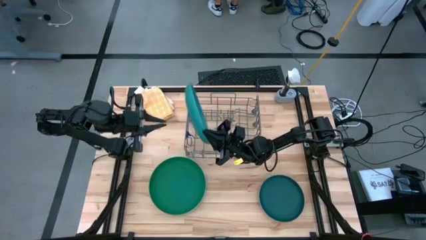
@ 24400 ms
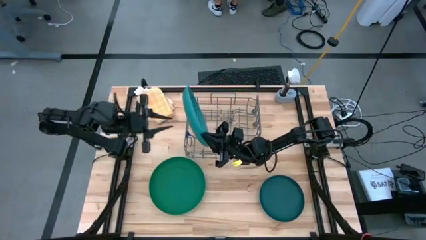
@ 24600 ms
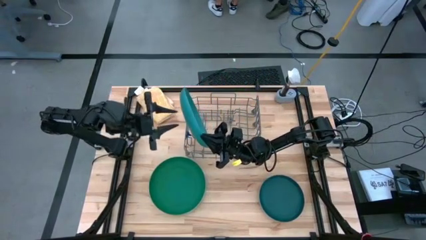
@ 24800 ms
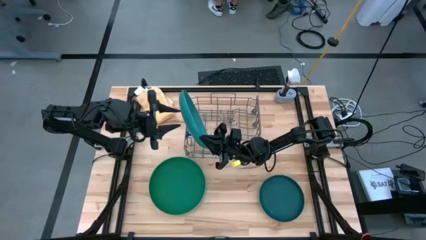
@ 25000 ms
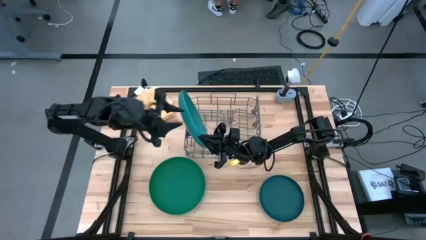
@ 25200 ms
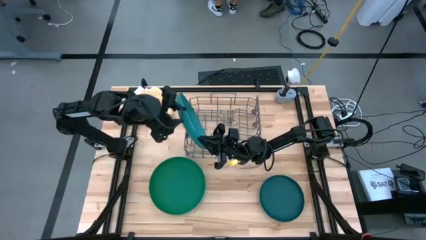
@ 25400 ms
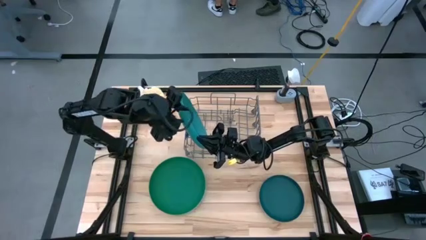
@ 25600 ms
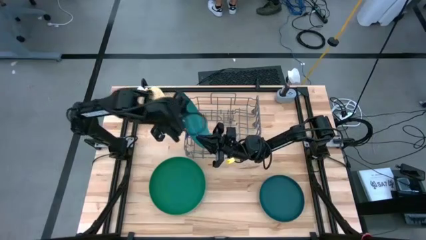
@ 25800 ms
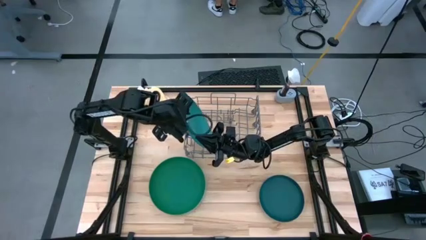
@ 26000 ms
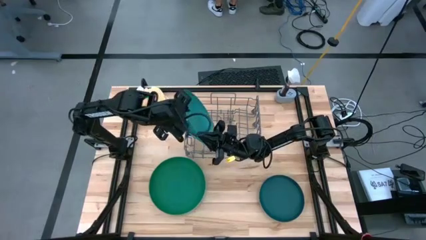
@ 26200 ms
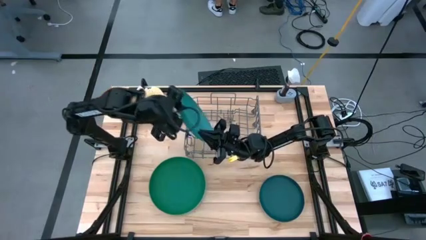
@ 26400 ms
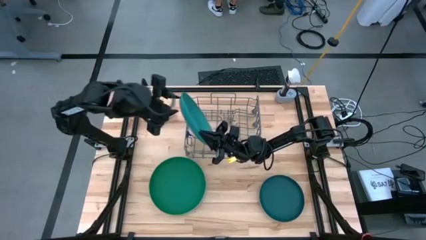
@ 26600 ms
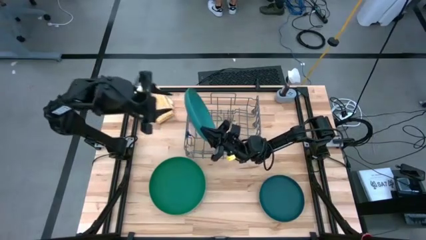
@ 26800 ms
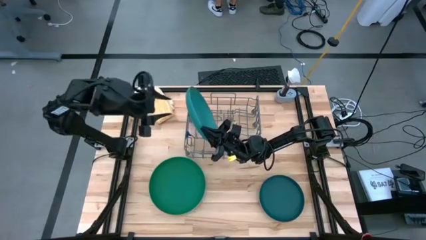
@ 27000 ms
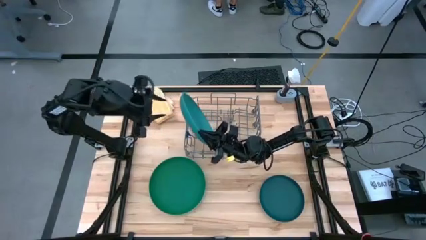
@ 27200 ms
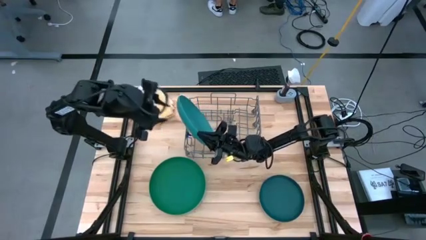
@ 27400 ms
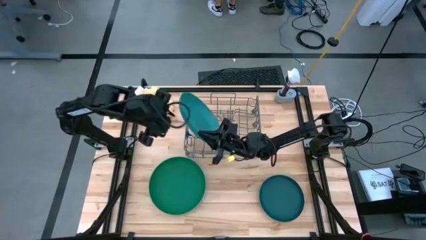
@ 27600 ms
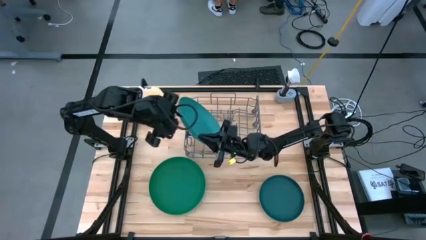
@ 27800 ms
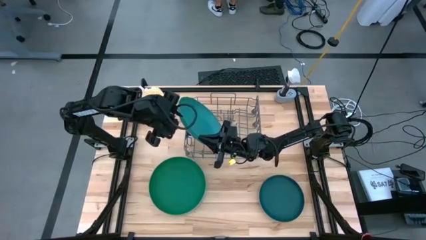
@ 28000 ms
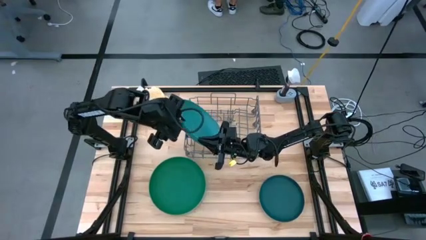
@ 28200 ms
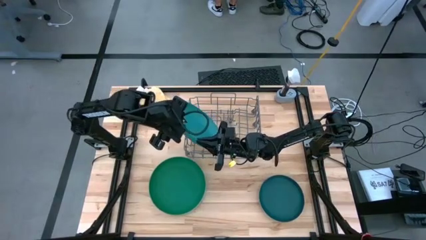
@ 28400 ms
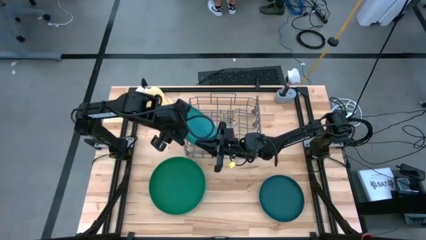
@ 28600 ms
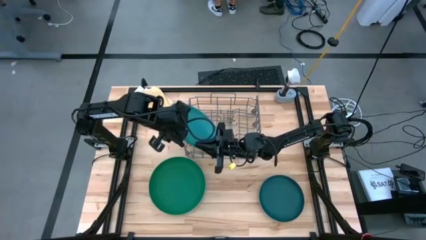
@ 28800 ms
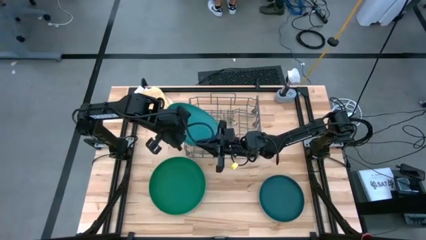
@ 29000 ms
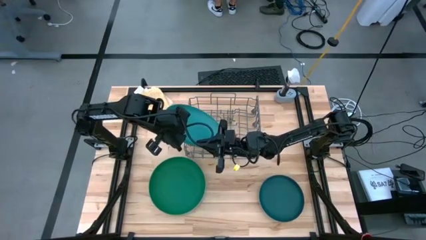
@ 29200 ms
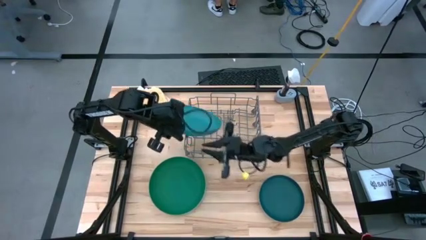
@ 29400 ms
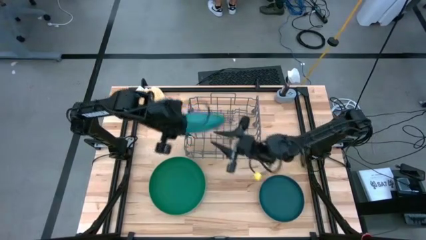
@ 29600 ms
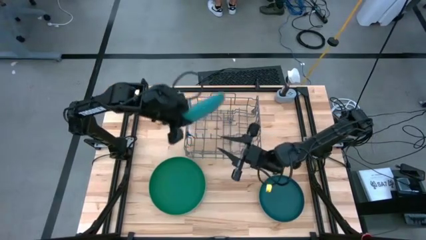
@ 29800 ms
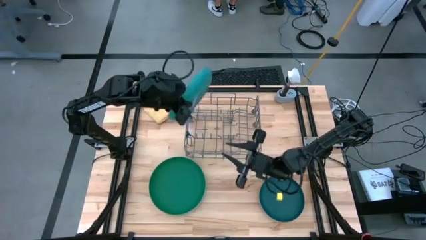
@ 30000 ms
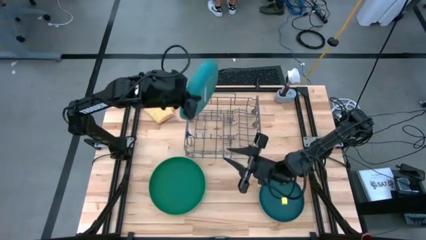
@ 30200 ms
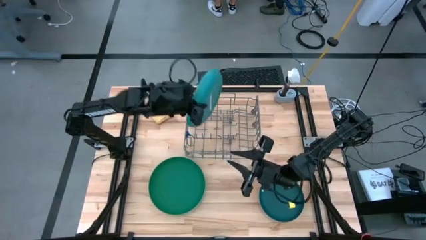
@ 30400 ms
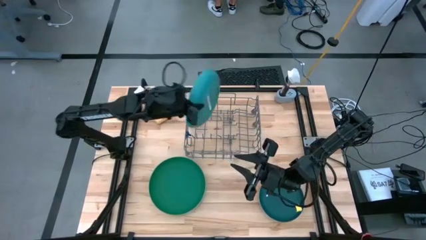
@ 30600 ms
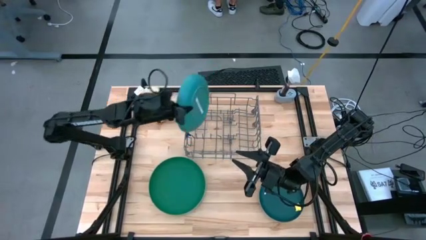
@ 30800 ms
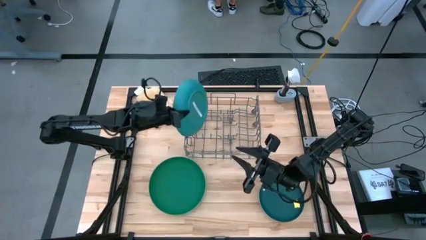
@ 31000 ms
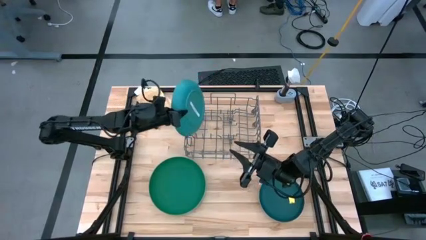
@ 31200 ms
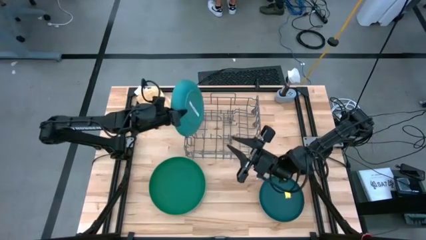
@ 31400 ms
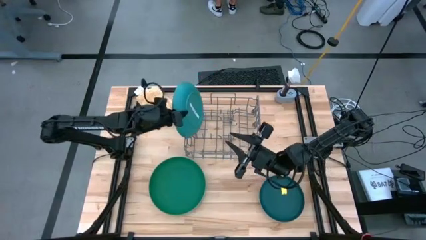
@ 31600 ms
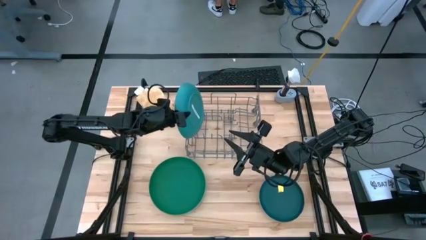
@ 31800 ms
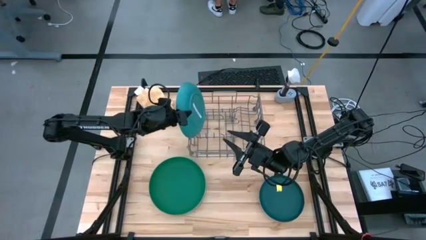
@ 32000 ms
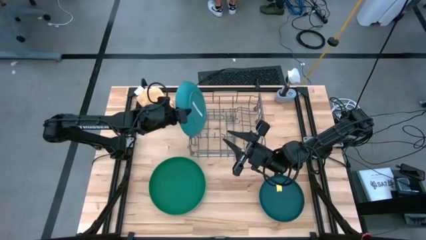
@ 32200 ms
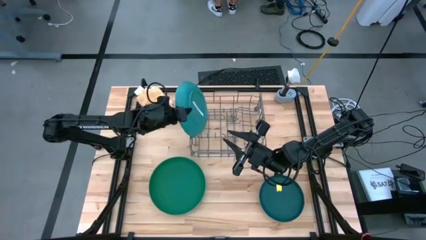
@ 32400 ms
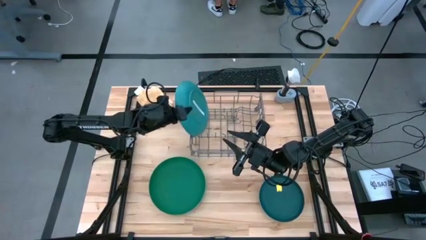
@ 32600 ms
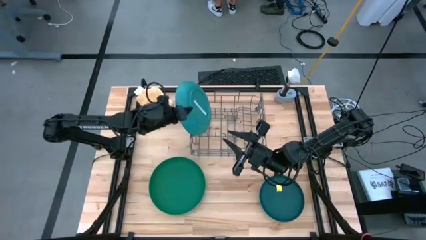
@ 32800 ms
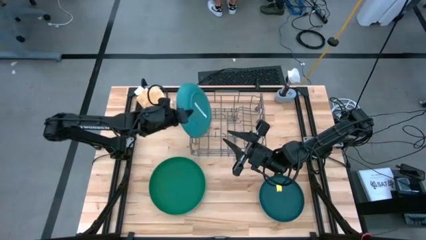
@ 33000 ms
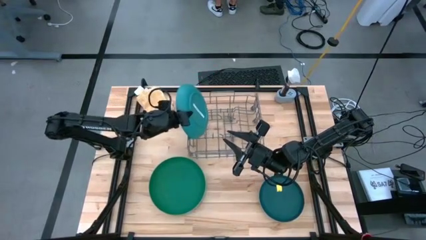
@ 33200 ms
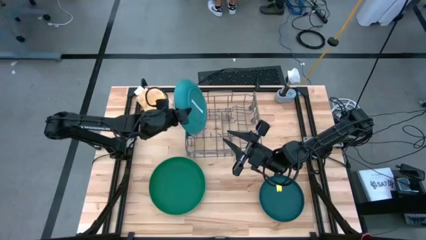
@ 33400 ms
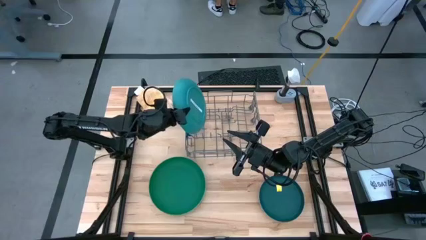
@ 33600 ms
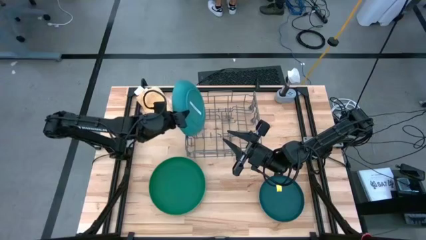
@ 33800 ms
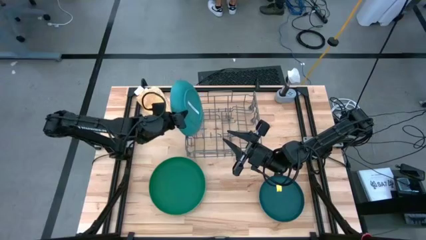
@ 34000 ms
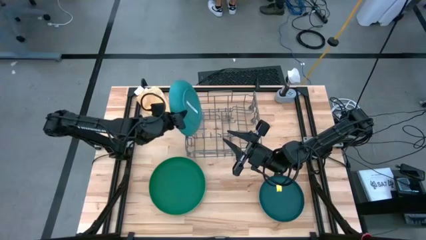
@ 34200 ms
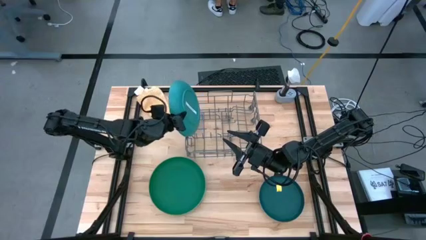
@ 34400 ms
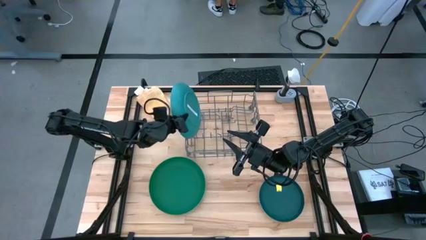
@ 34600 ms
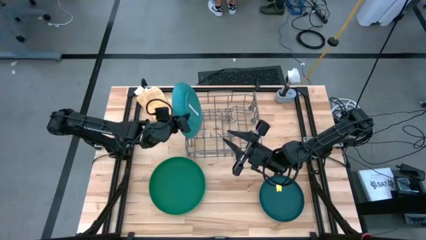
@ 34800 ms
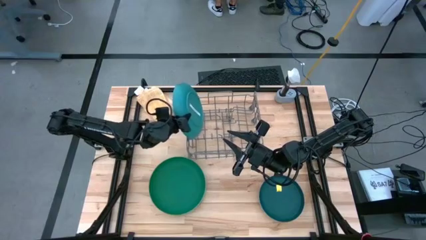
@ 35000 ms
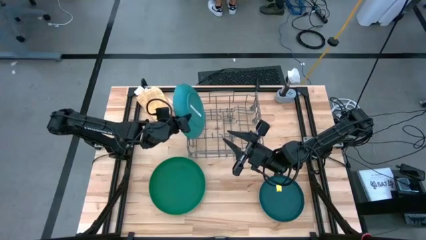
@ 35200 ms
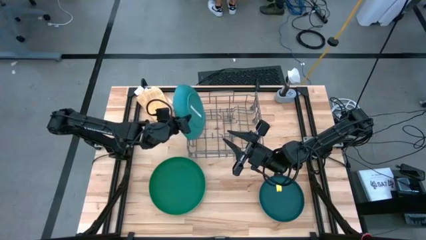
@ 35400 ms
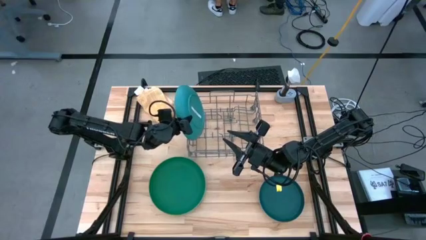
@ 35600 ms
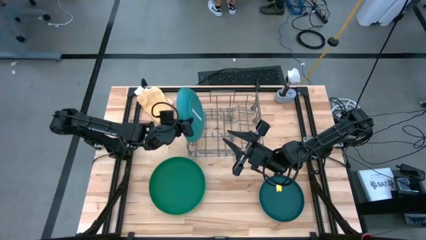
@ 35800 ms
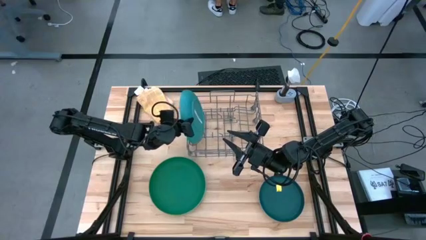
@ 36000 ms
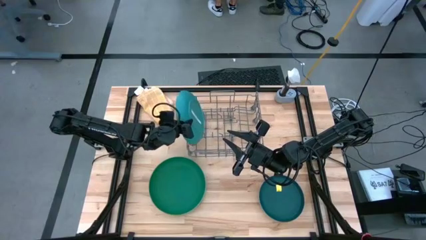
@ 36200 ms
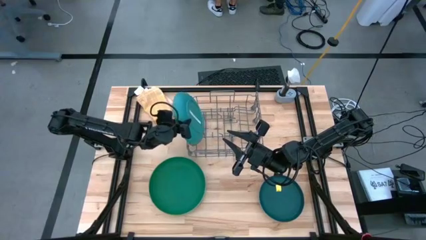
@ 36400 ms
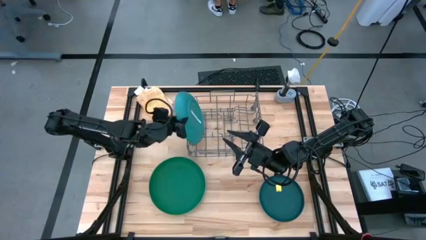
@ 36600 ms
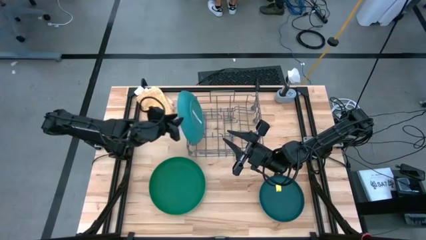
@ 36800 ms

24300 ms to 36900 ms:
Task: Sort dishes
Put the blue plate into the dishwasher rack
